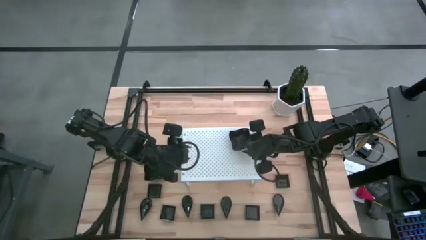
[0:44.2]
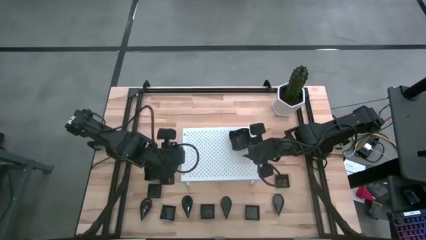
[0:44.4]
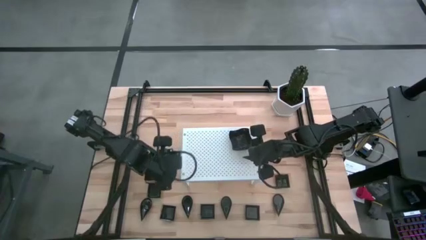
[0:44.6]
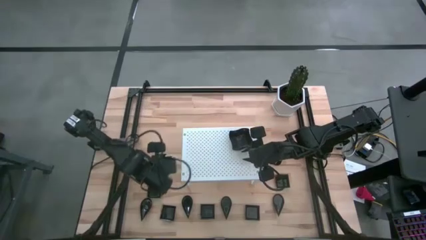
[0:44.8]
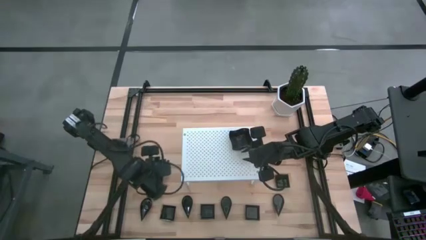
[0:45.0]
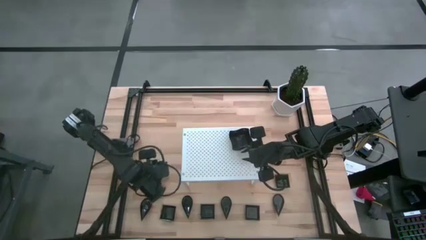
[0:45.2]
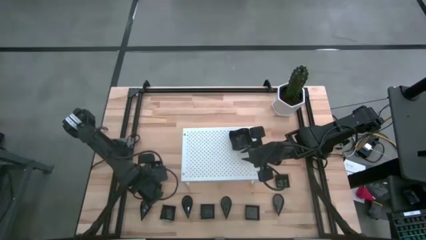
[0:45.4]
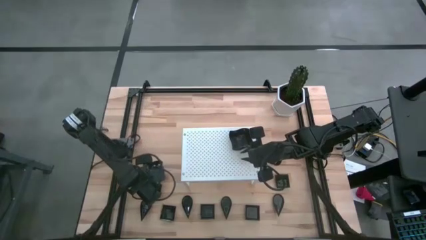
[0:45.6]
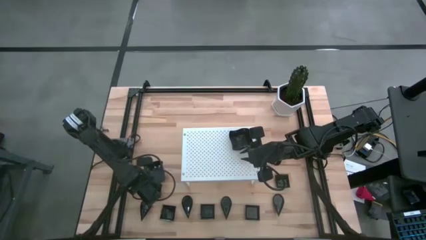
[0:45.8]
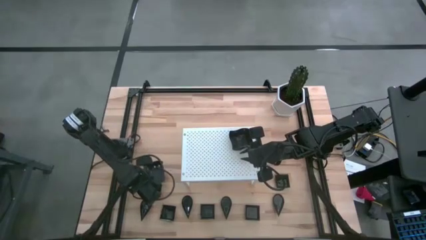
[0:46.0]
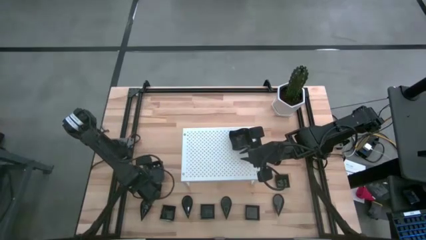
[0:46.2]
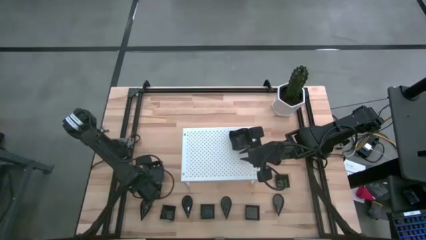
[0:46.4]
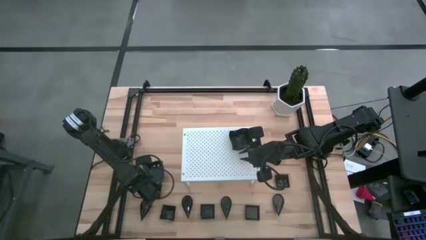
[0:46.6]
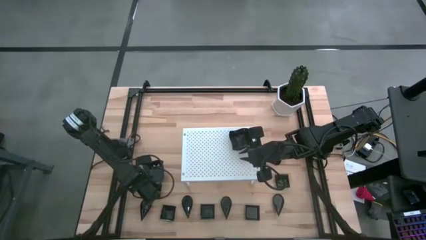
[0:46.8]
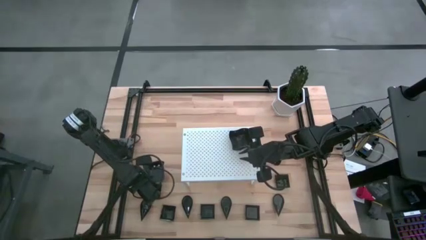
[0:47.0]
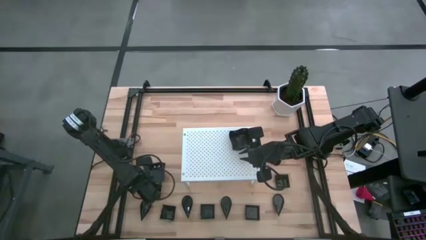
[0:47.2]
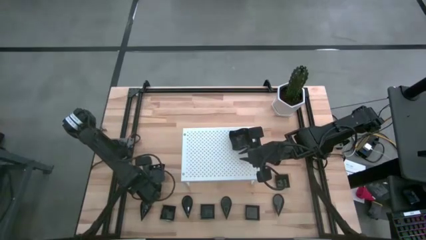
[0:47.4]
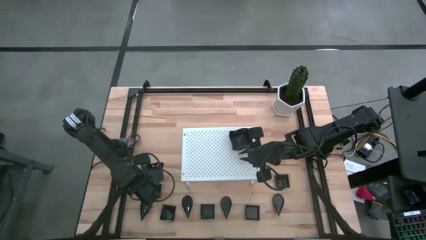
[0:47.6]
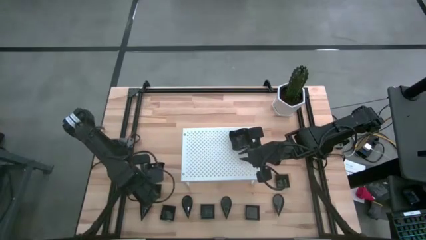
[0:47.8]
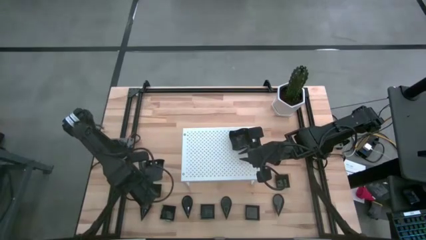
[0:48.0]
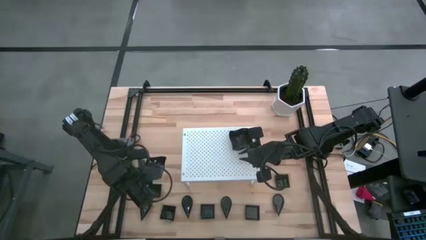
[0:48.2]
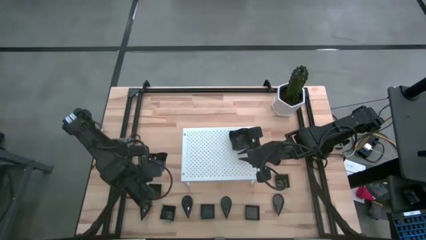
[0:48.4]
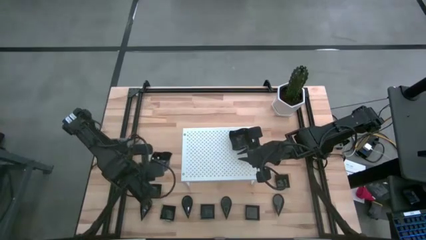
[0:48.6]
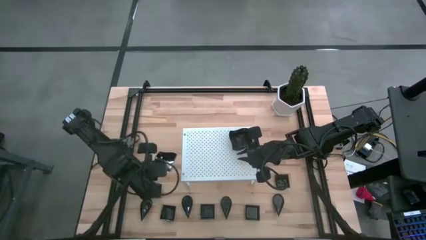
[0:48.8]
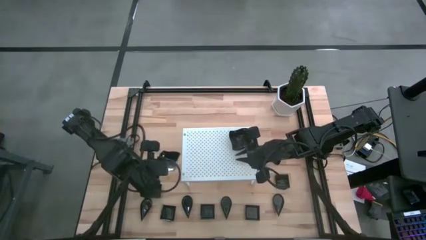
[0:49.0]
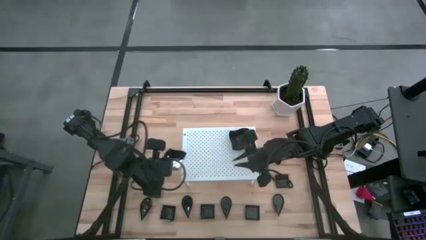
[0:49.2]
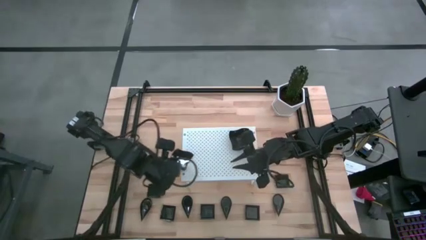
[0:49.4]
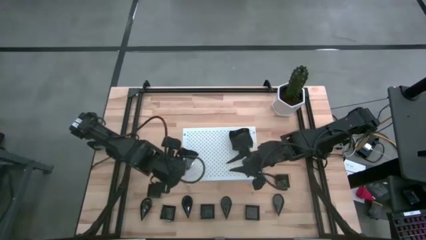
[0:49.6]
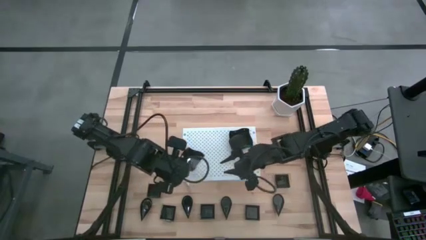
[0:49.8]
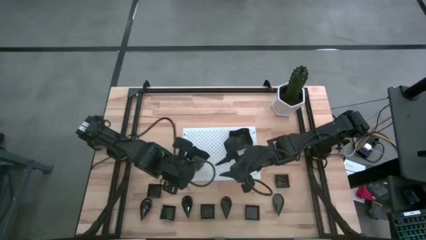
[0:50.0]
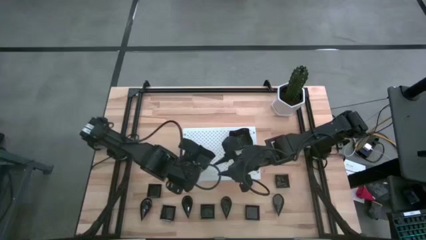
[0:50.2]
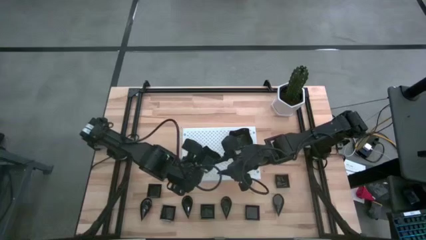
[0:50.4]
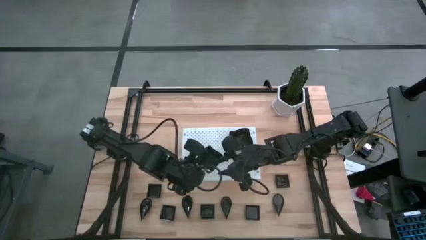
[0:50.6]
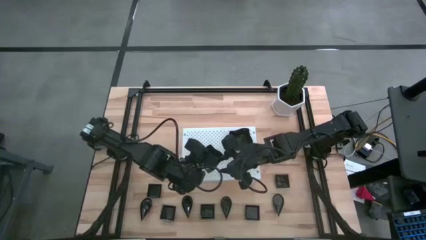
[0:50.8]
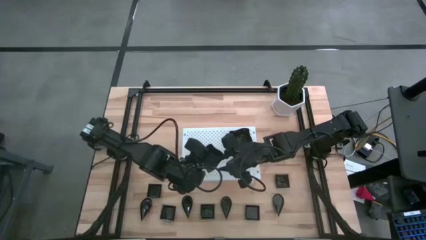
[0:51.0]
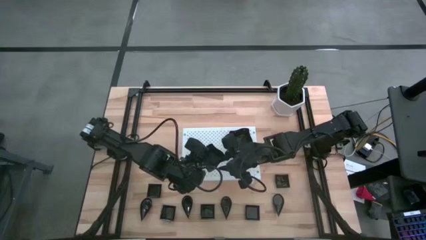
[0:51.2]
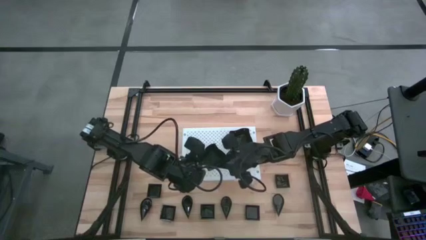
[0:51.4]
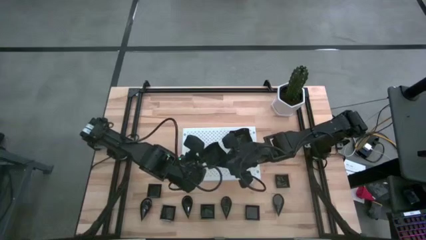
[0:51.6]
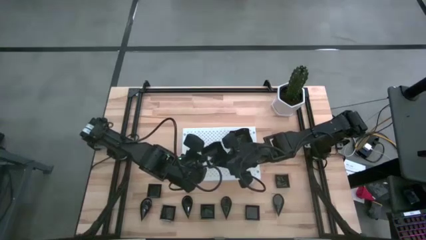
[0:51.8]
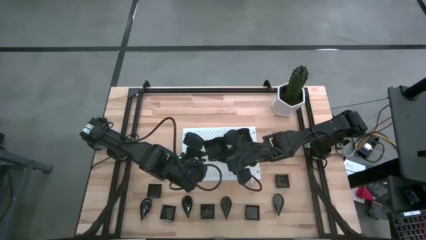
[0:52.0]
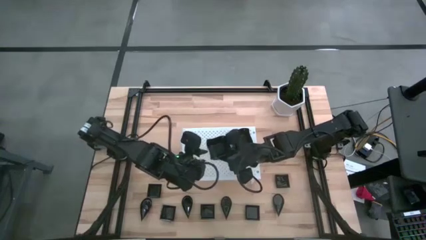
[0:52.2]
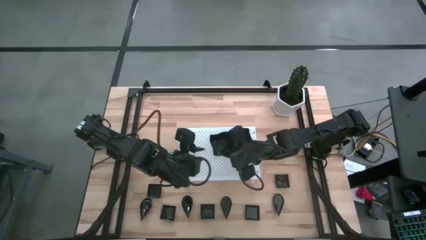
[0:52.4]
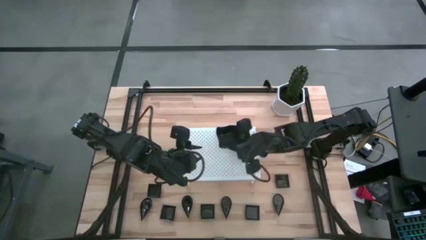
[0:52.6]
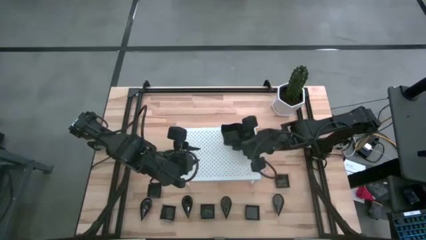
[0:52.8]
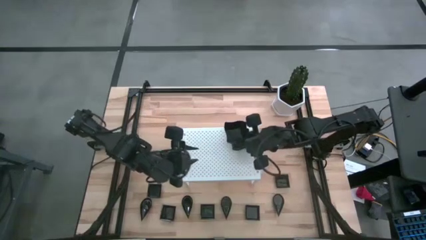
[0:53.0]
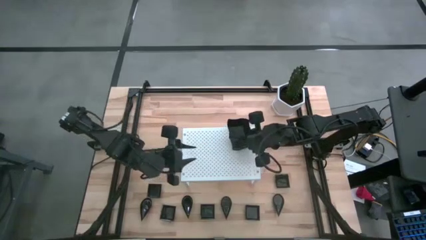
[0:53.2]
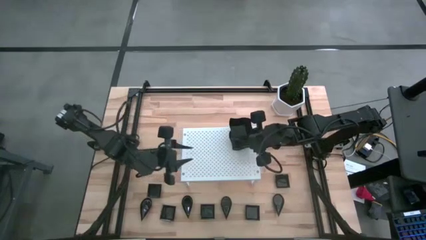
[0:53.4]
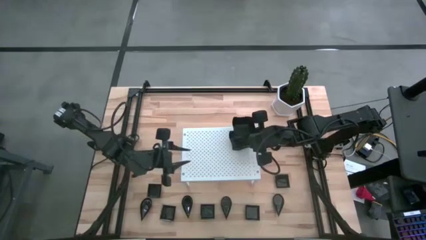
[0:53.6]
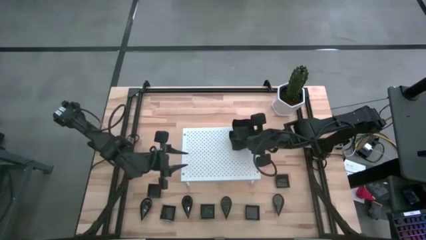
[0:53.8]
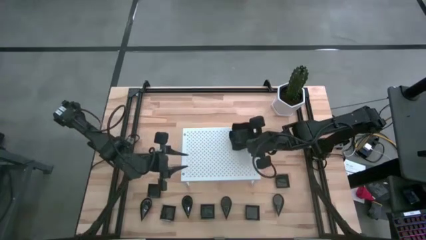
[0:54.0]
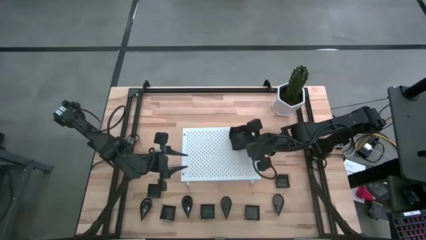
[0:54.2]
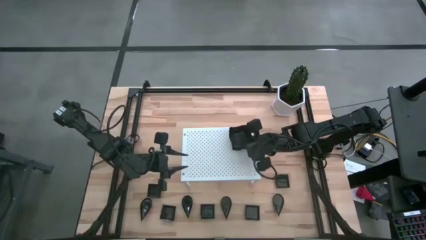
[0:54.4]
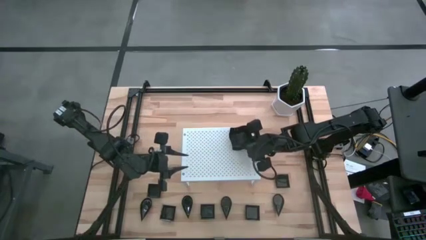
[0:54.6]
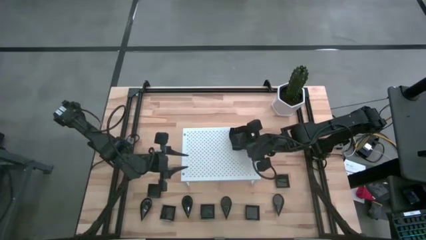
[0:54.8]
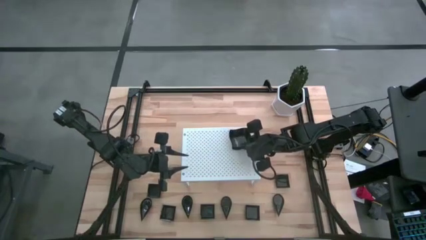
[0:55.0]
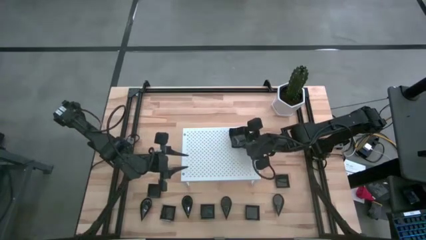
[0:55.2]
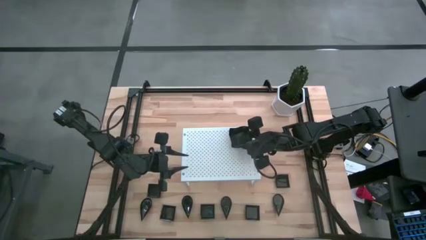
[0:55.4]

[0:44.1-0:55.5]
Task: Pick & Place Mini shaped plates
Stack the distorted square plate on the other distorted square plate on the shelf

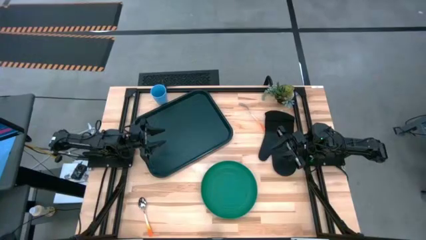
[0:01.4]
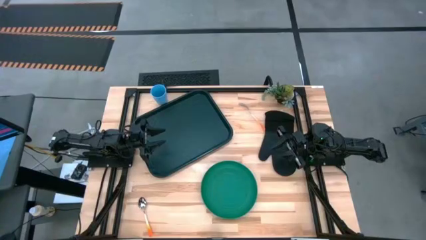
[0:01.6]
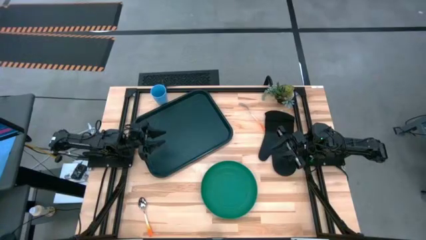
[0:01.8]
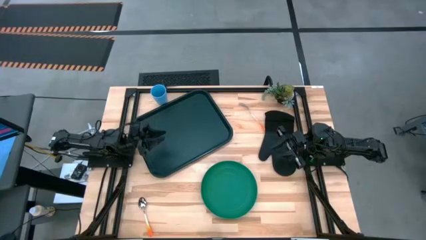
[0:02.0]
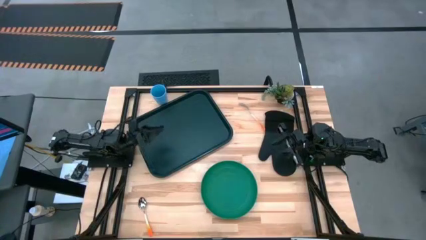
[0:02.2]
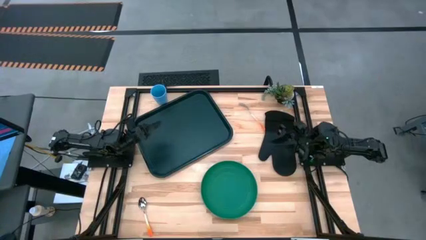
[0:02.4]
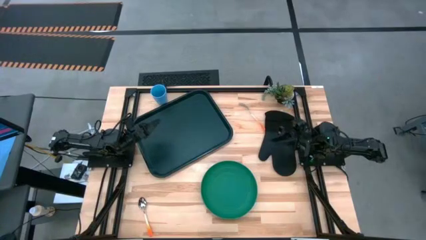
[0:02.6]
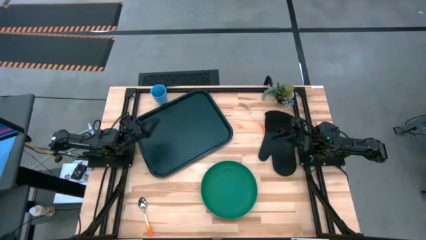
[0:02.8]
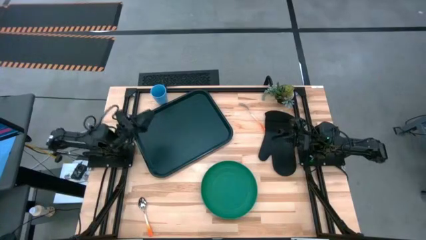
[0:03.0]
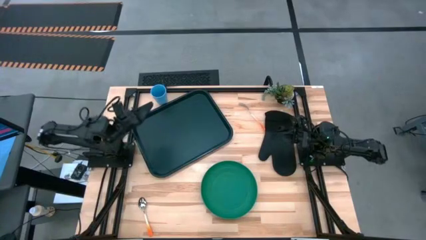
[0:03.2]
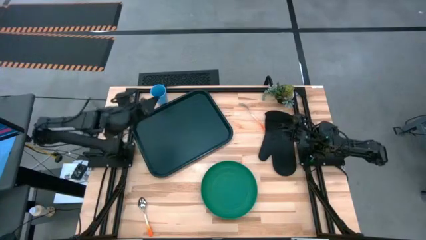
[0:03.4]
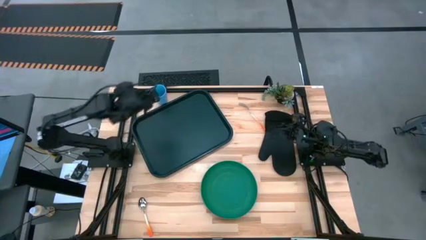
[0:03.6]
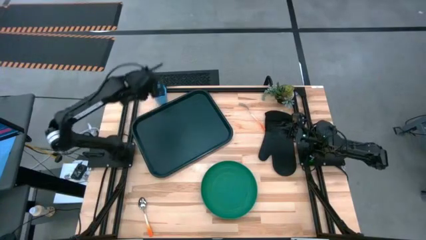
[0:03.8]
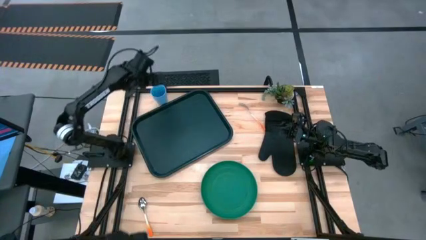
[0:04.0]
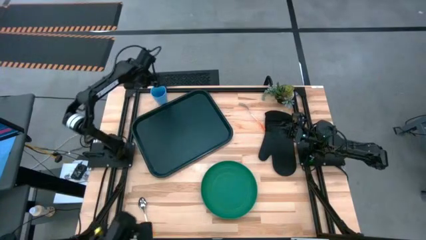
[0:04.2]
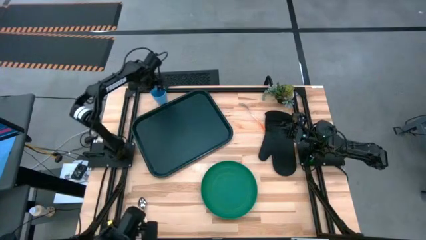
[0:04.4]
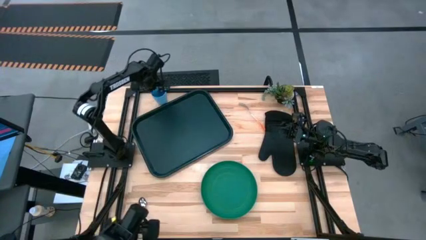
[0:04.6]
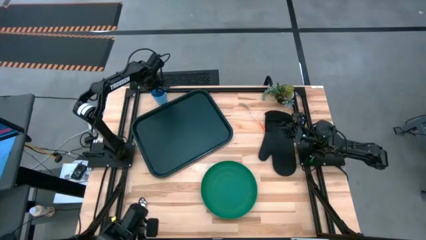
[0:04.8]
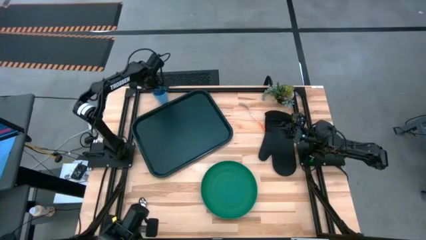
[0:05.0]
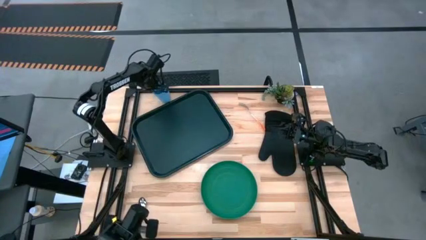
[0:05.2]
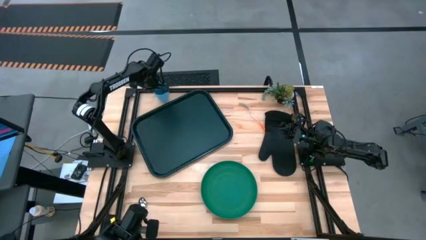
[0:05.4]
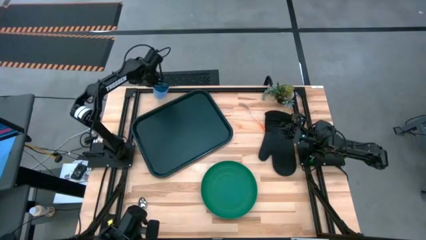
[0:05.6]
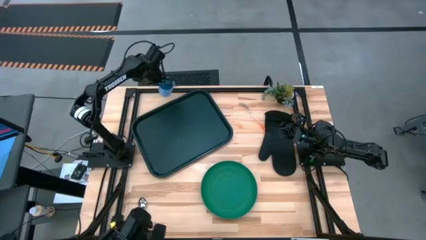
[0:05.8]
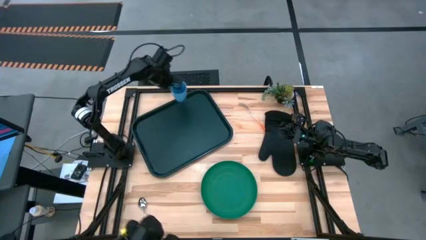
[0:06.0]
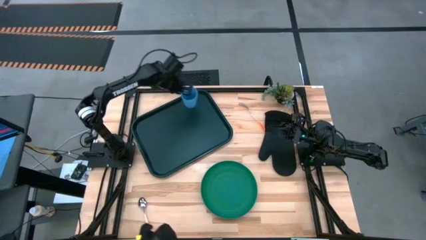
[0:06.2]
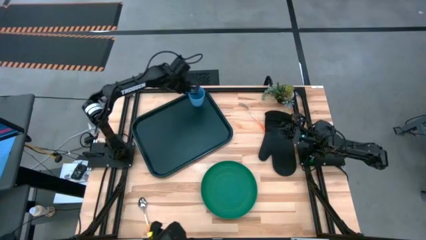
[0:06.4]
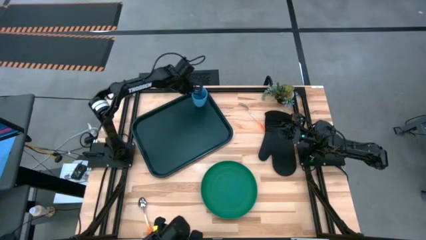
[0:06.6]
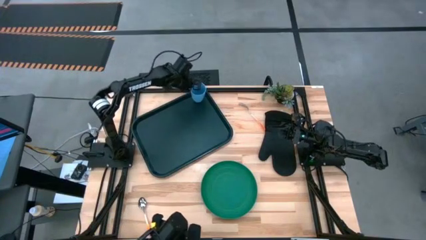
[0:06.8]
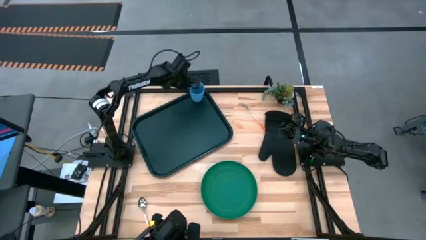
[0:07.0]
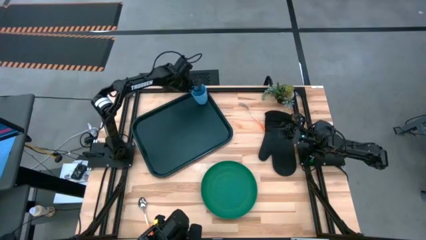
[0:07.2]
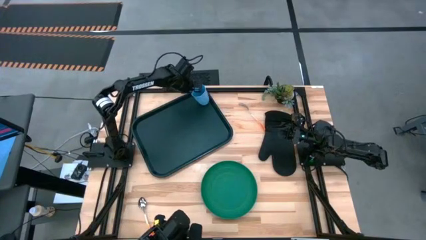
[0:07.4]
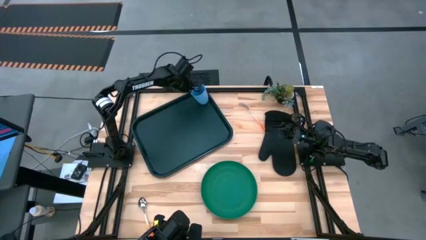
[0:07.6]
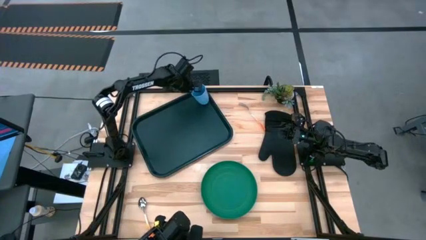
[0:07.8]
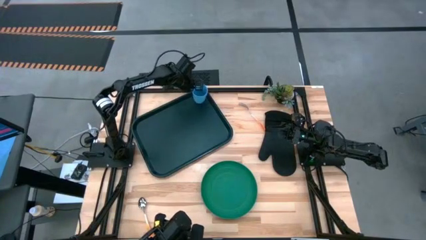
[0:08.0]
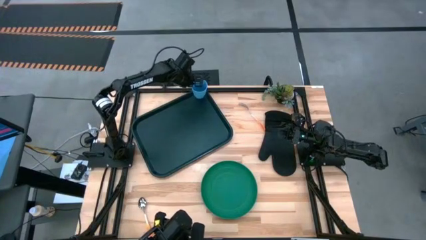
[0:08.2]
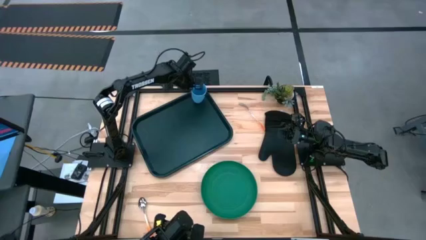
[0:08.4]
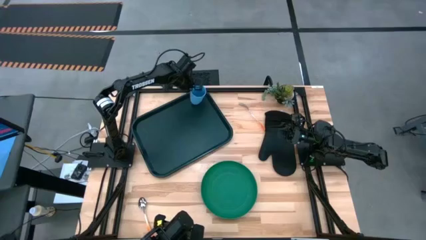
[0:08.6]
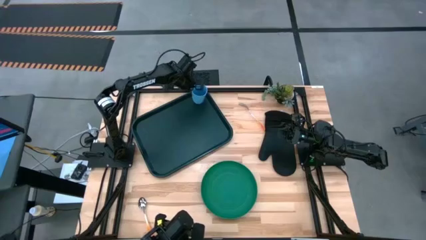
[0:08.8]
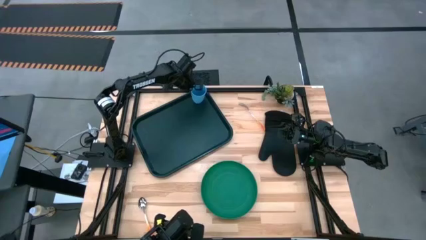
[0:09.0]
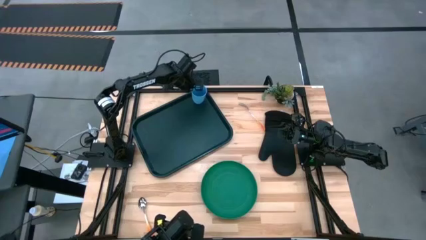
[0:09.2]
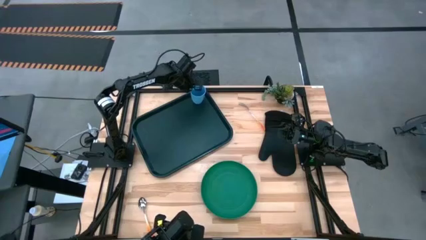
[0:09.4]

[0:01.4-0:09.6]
Task: Pick and place plate/cup/fork/spoon on tray
Put the blue cup on the black serving tray
